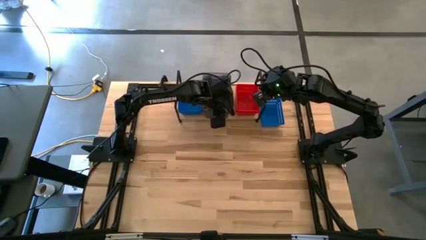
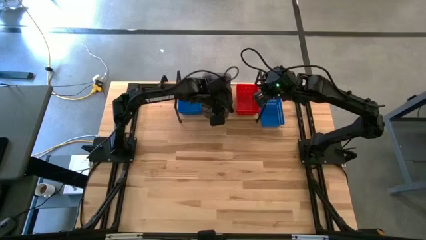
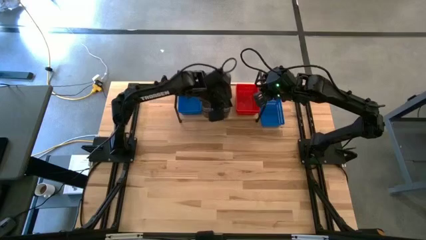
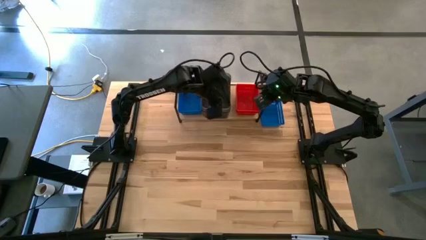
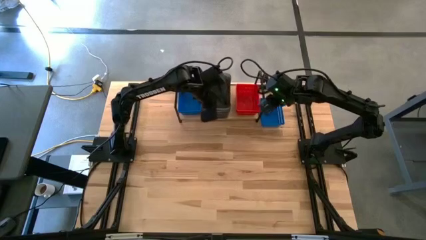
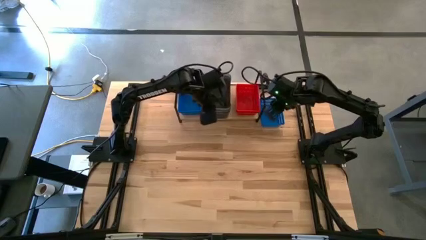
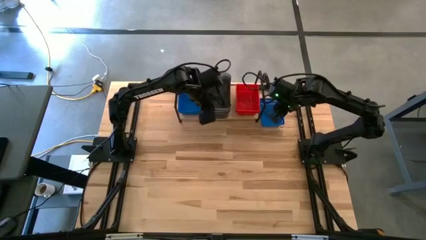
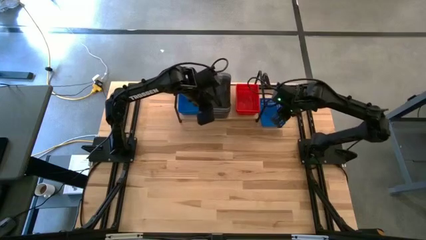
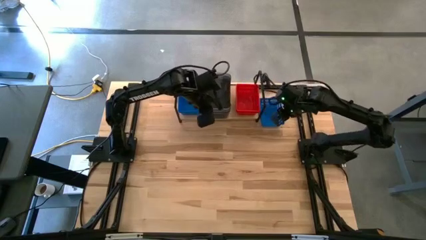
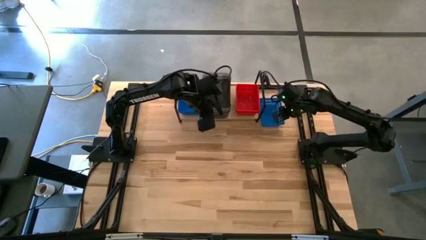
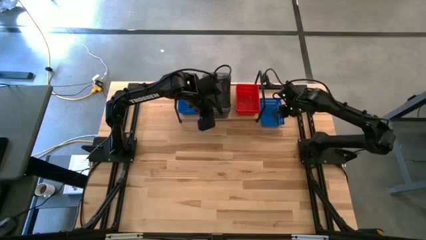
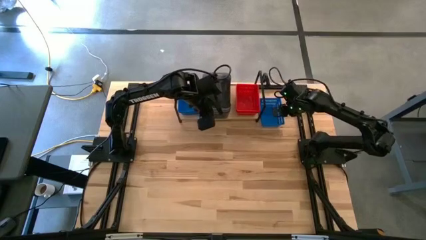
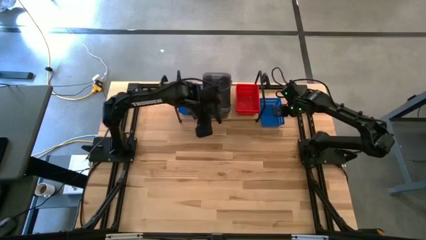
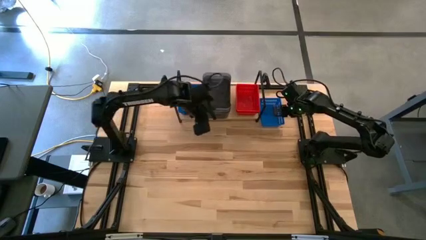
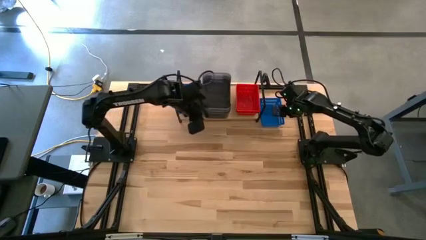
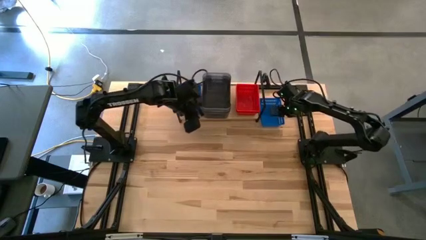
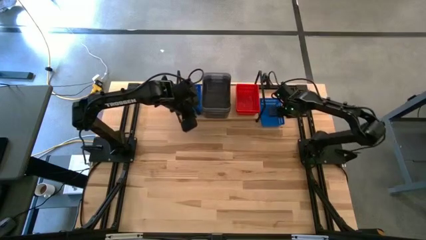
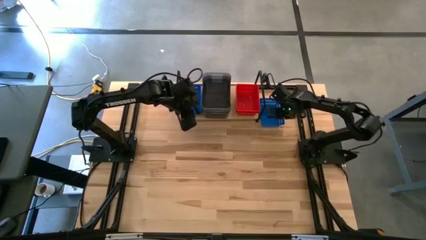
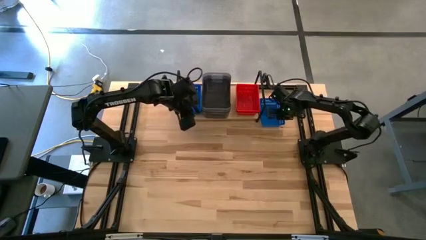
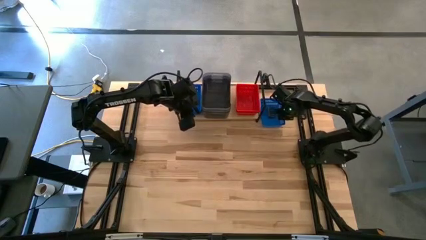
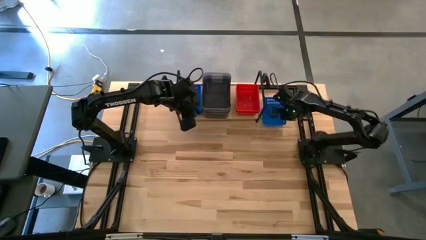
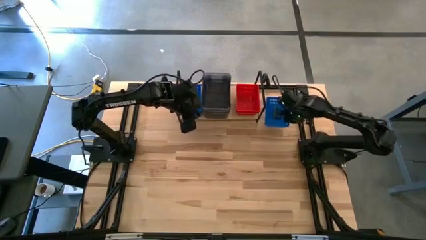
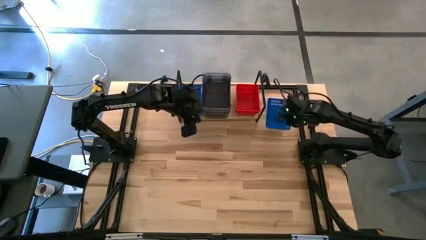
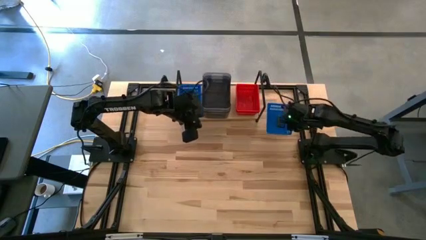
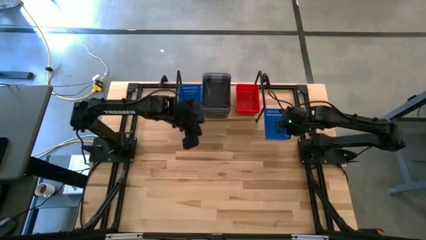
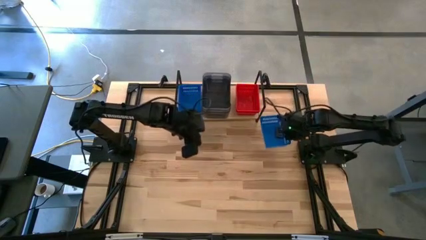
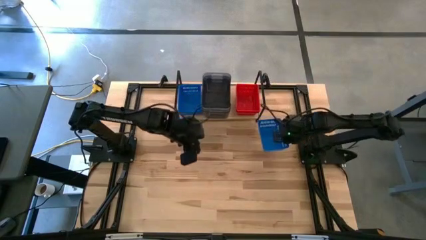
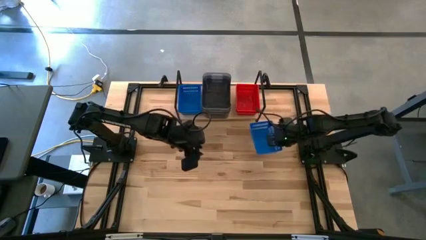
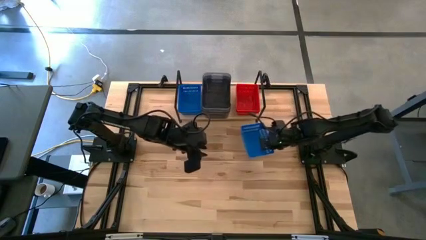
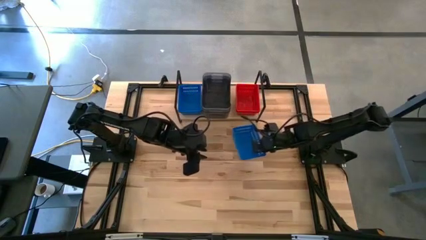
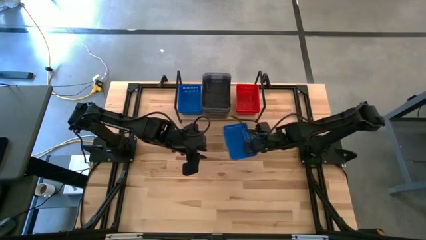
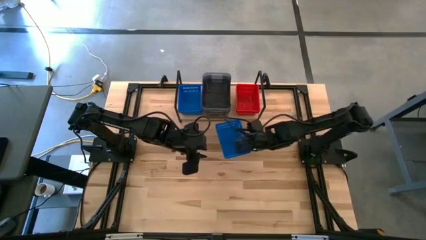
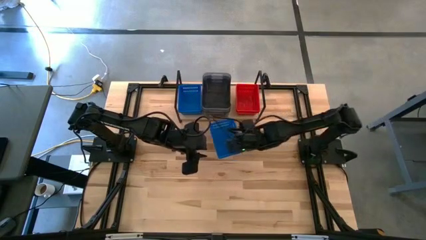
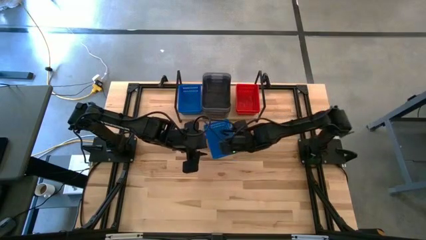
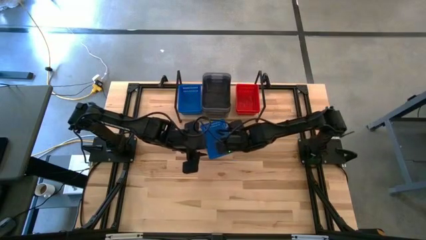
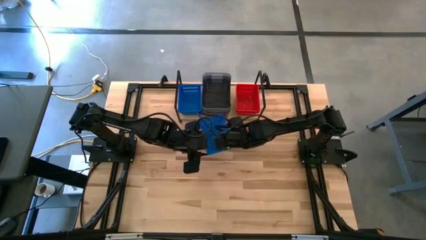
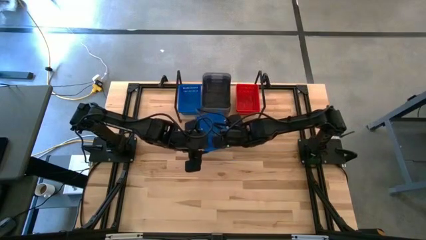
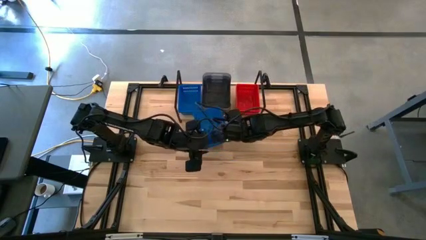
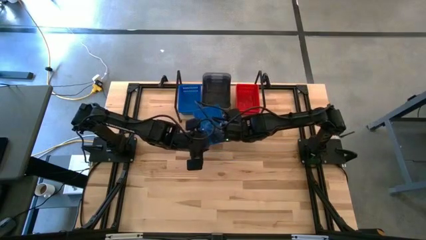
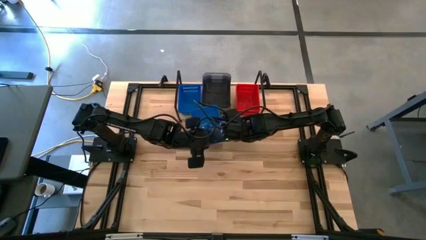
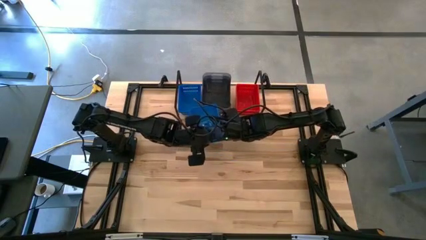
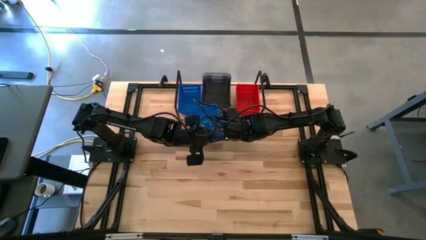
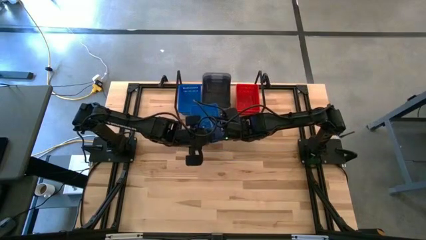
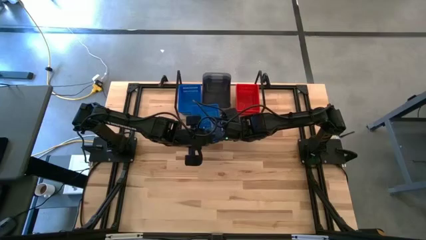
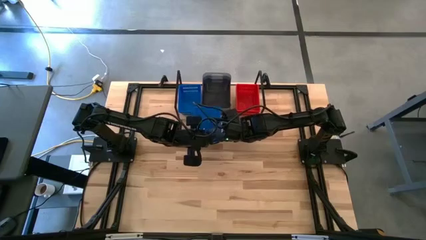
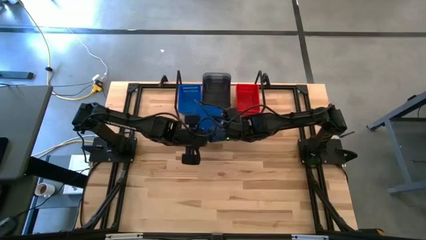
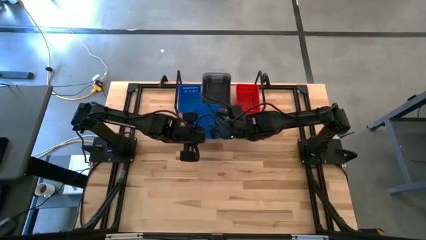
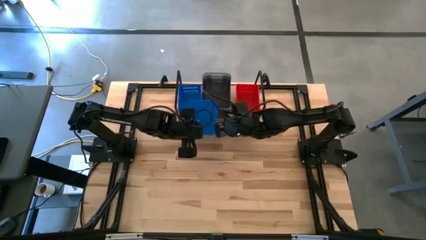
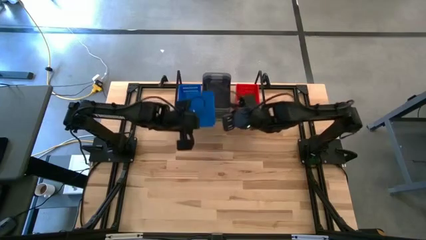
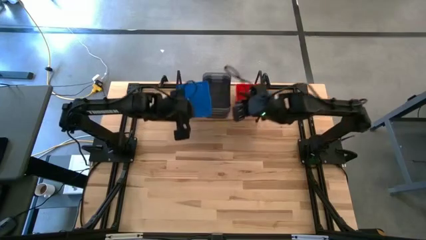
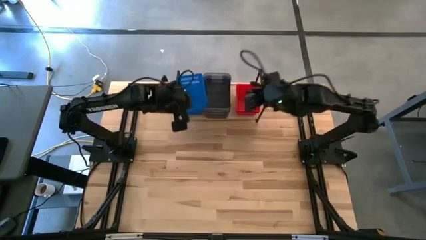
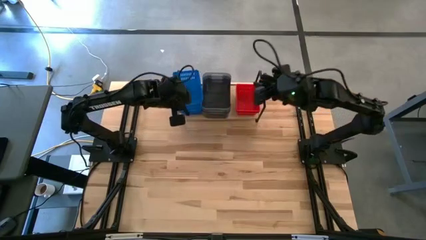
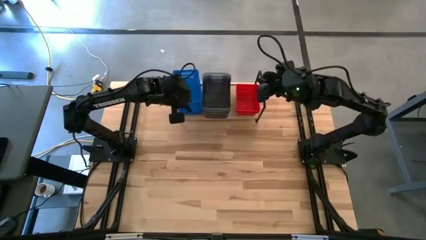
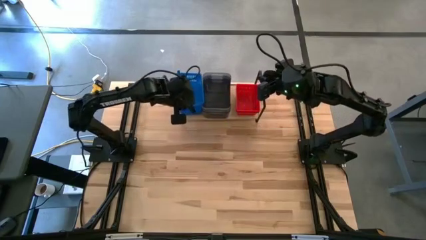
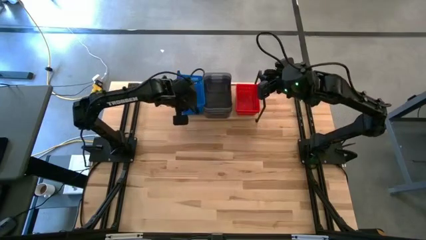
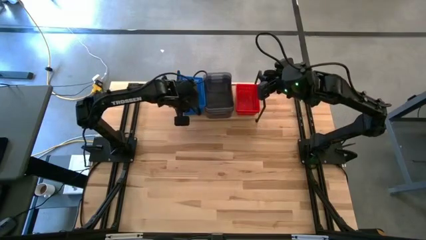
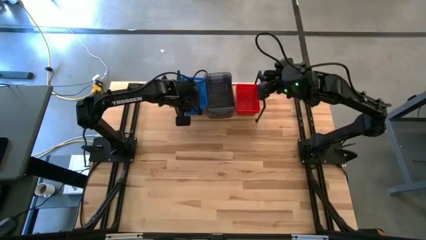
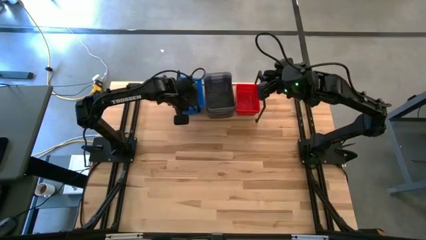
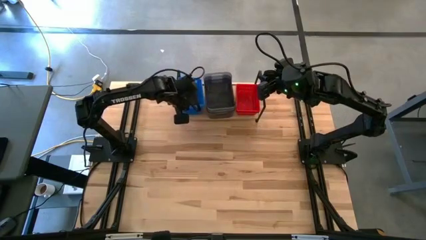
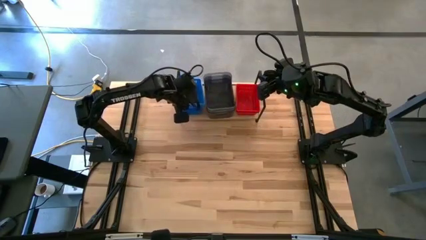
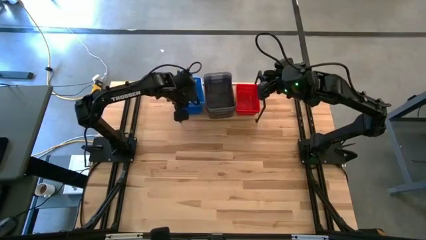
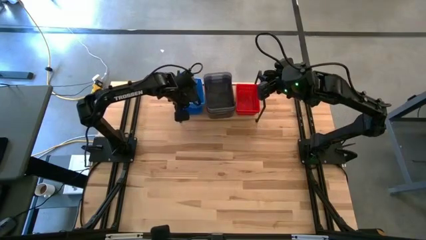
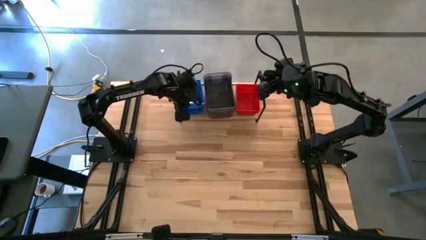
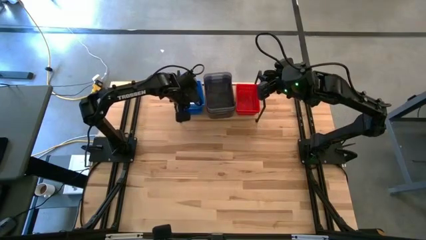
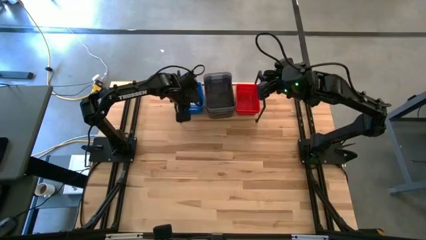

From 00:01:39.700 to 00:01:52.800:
Task: Stack baskets on shelf by color
Stack the blue bin on the other blue bin on the shelf

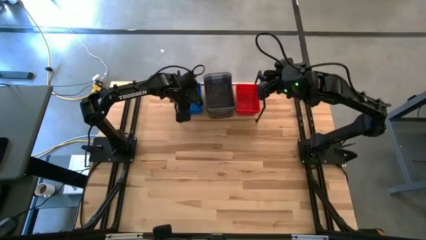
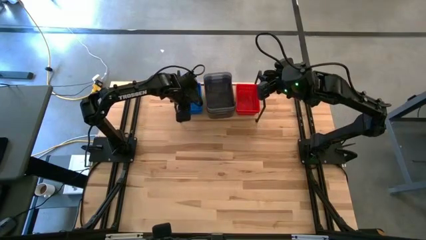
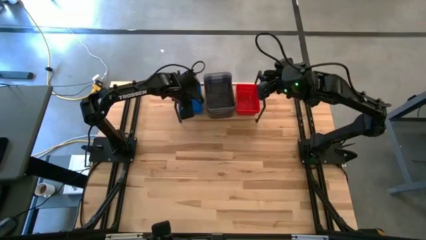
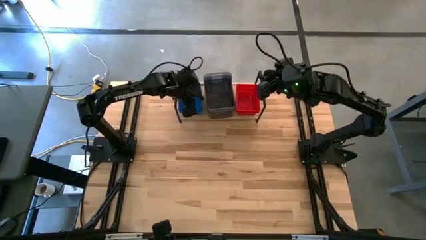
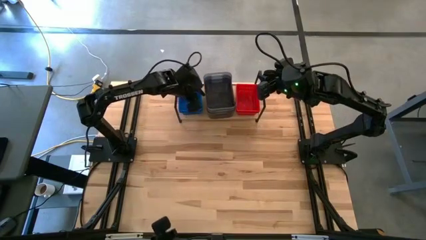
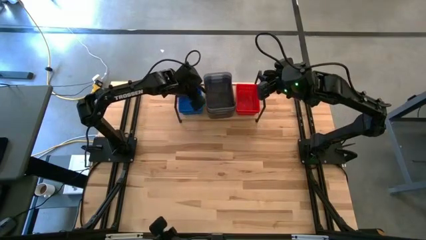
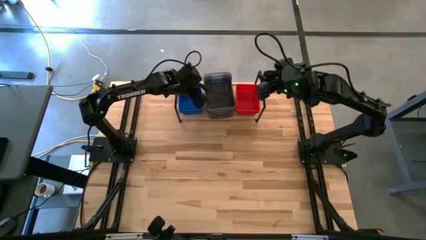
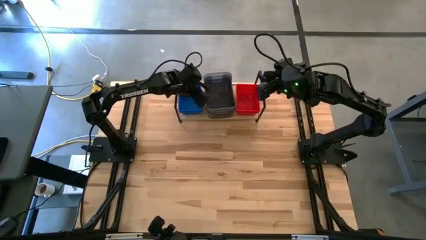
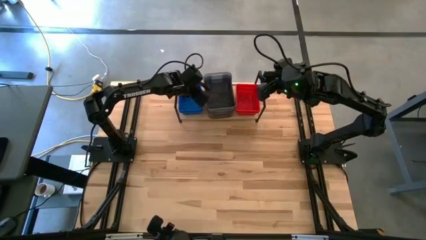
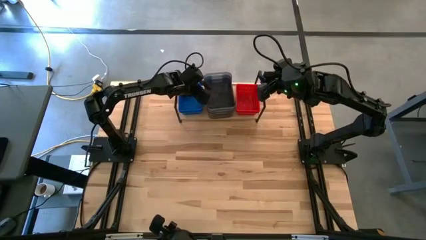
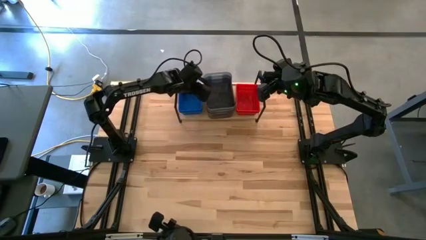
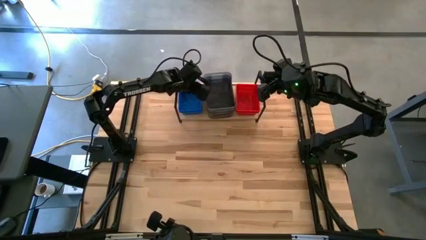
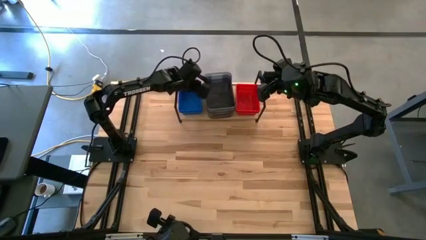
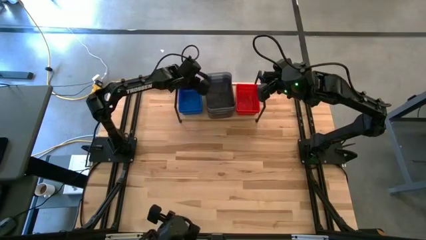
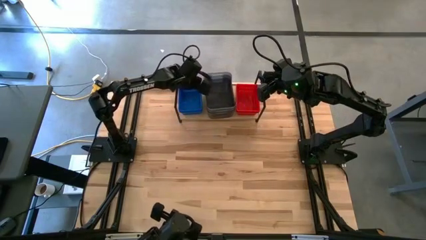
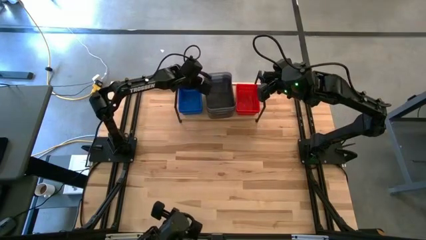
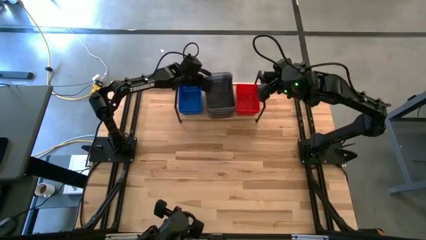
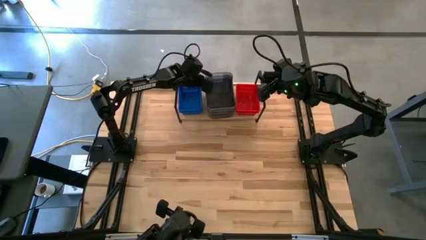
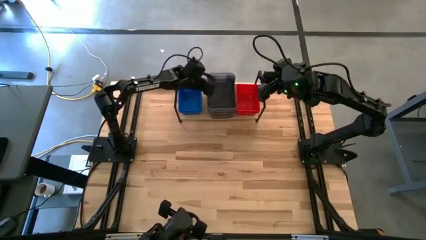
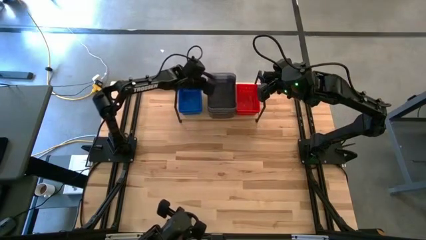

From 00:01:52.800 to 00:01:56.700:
Adjust the black bins on the shelf

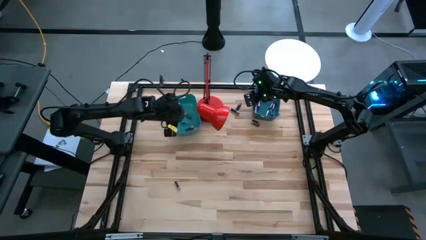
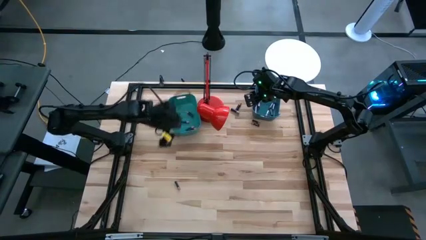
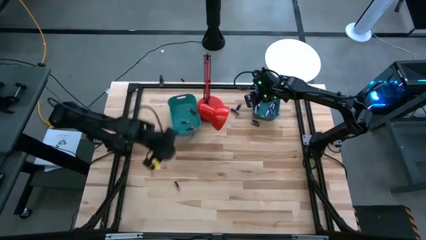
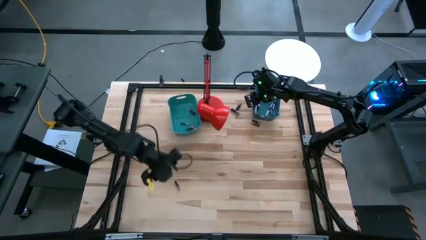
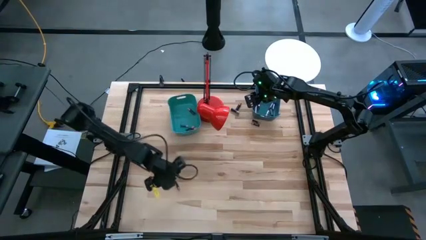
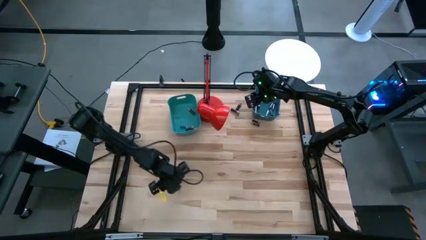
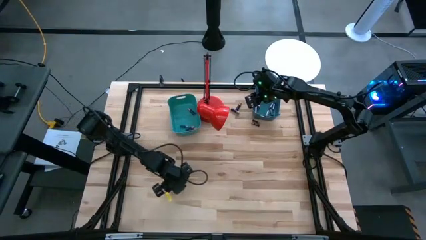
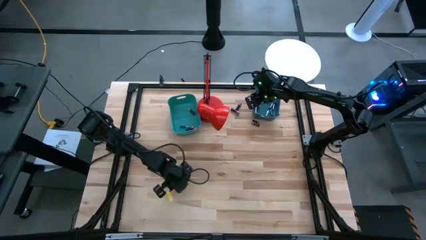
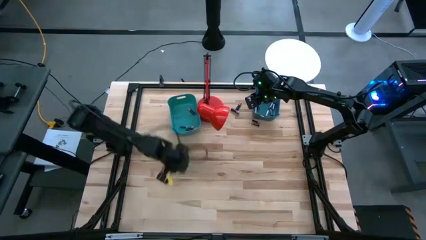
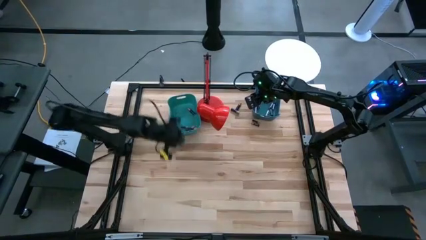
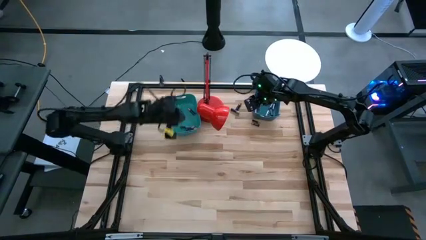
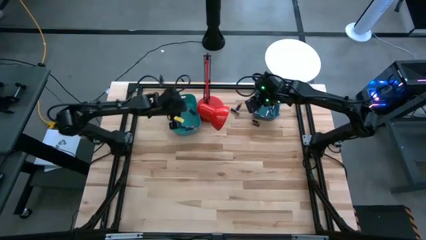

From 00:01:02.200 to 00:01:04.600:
Task: Sort batteries
Put the brown battery into the green bin
